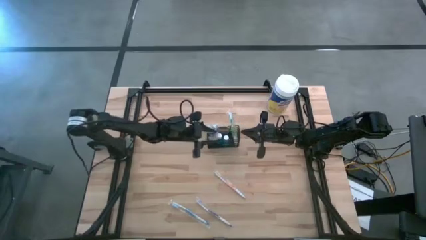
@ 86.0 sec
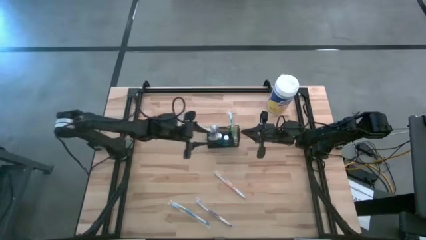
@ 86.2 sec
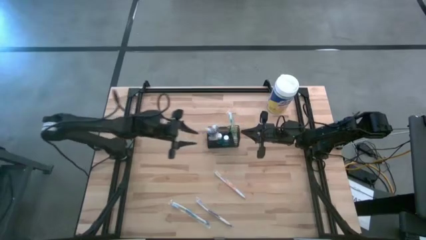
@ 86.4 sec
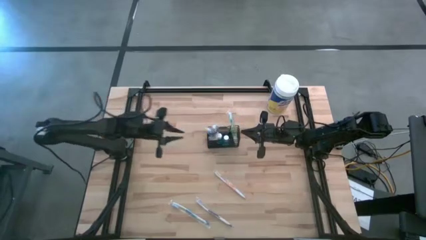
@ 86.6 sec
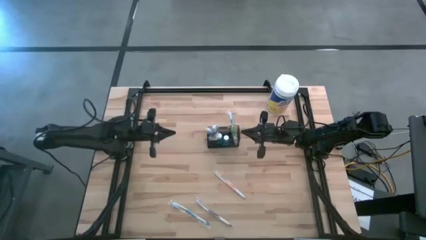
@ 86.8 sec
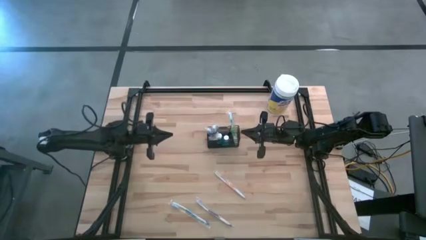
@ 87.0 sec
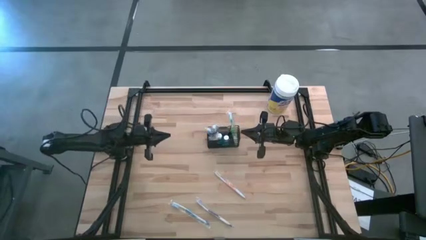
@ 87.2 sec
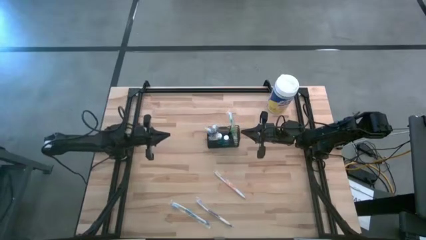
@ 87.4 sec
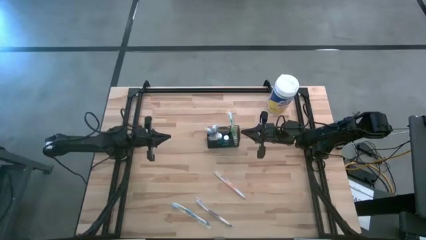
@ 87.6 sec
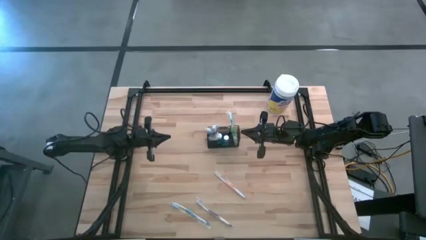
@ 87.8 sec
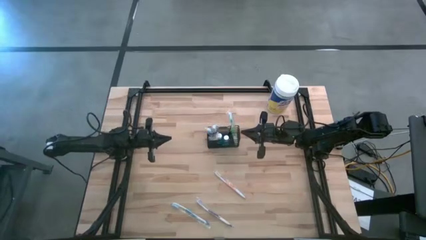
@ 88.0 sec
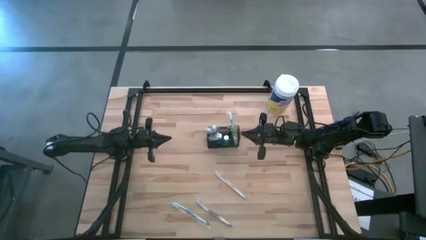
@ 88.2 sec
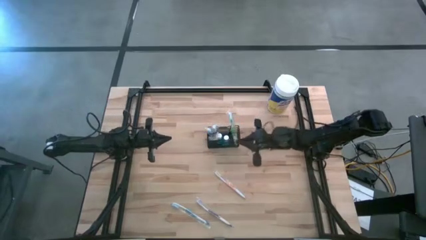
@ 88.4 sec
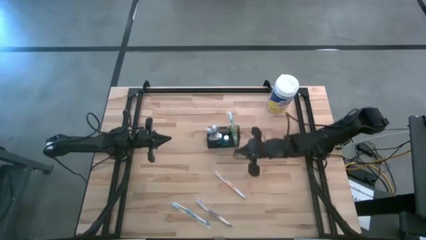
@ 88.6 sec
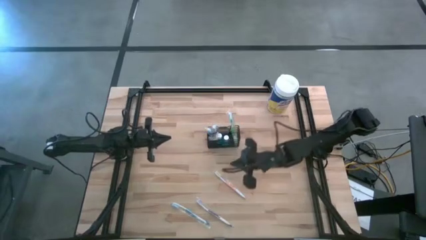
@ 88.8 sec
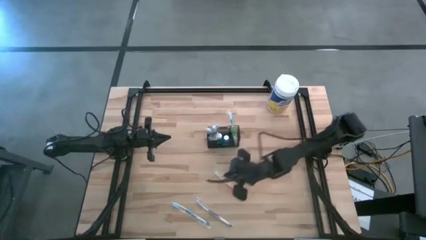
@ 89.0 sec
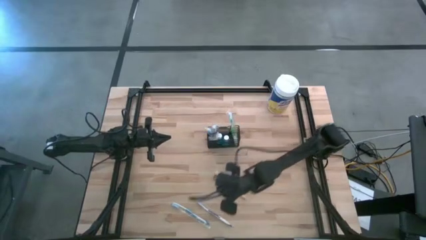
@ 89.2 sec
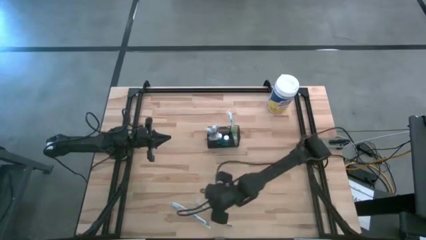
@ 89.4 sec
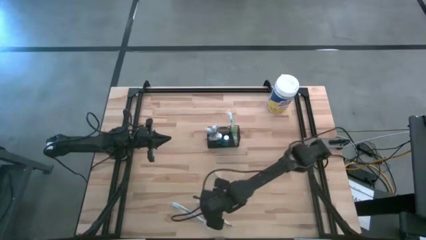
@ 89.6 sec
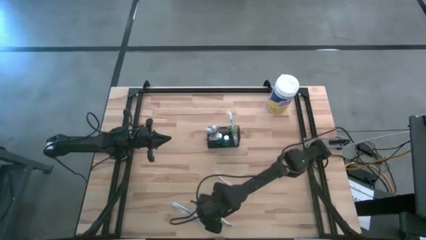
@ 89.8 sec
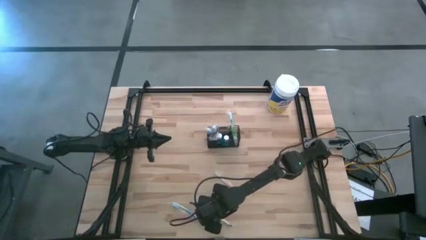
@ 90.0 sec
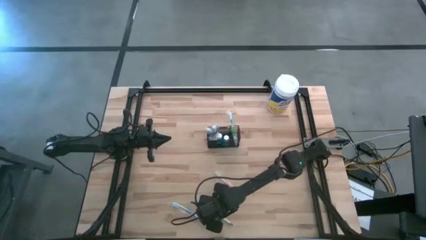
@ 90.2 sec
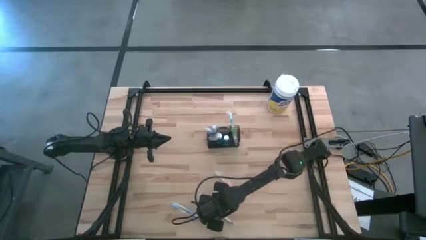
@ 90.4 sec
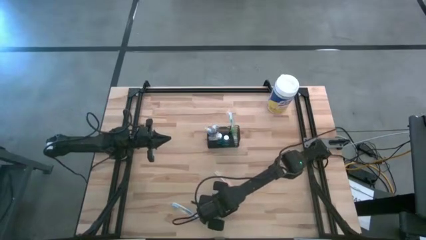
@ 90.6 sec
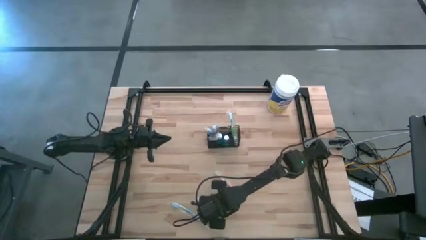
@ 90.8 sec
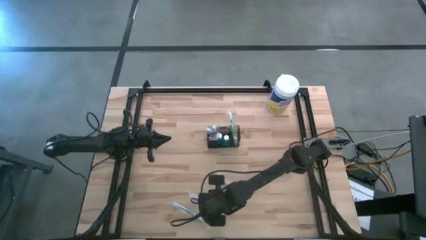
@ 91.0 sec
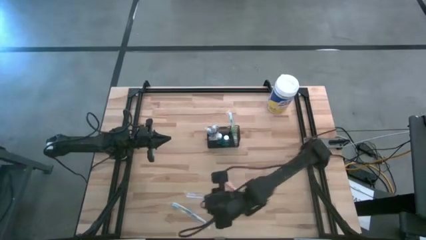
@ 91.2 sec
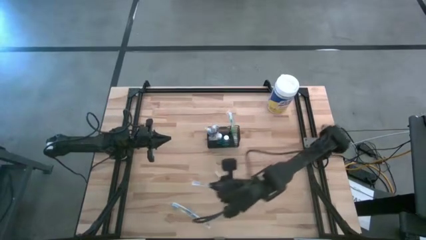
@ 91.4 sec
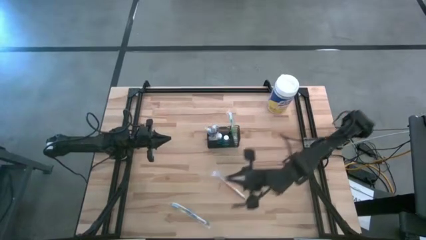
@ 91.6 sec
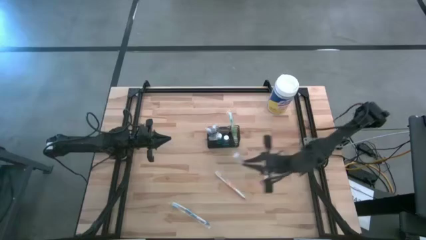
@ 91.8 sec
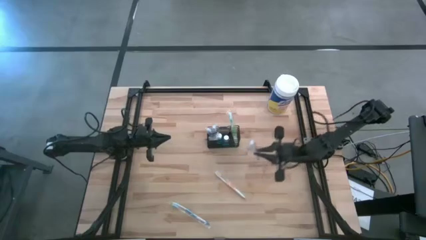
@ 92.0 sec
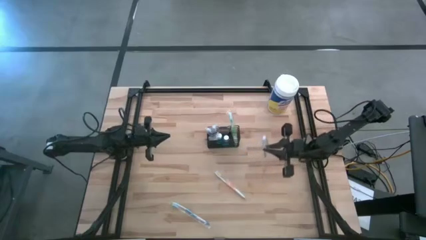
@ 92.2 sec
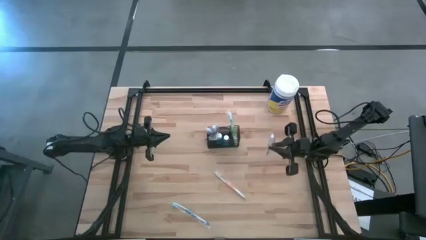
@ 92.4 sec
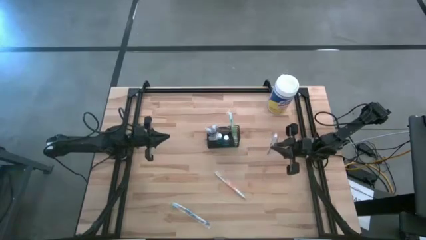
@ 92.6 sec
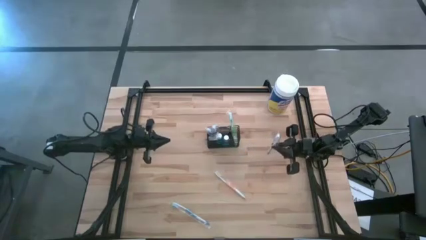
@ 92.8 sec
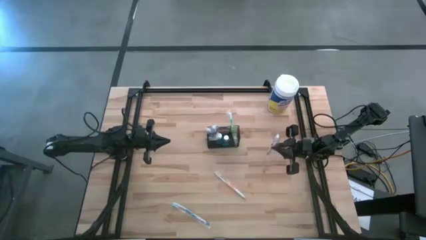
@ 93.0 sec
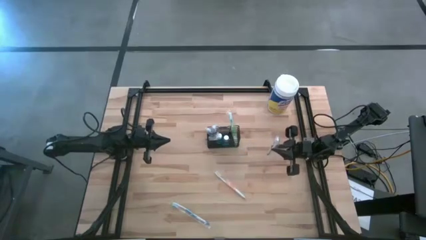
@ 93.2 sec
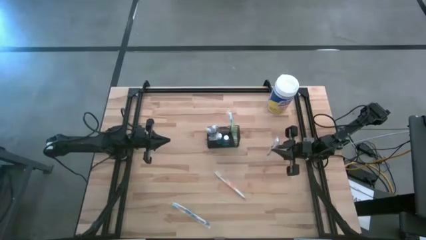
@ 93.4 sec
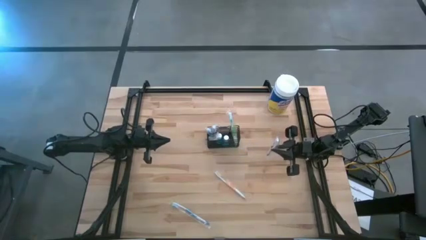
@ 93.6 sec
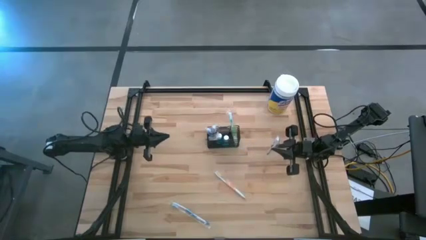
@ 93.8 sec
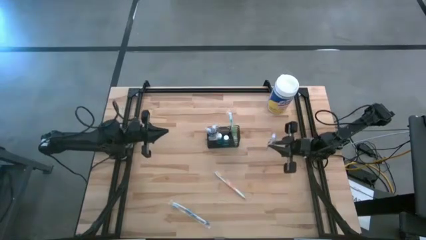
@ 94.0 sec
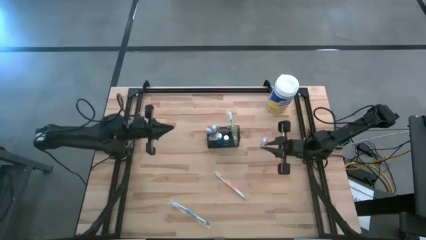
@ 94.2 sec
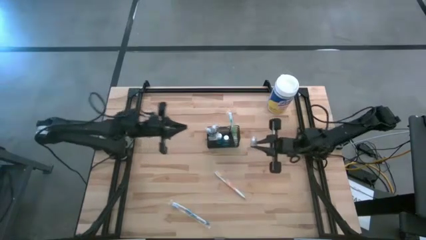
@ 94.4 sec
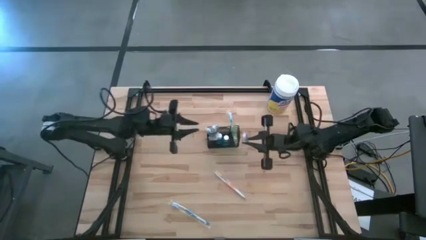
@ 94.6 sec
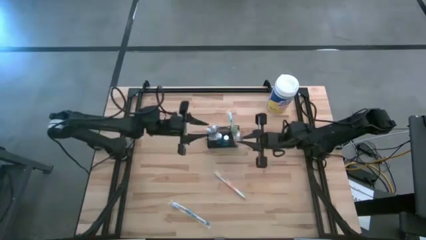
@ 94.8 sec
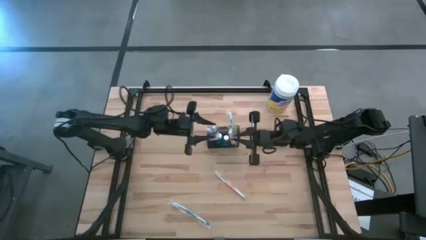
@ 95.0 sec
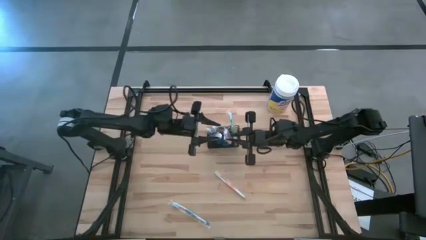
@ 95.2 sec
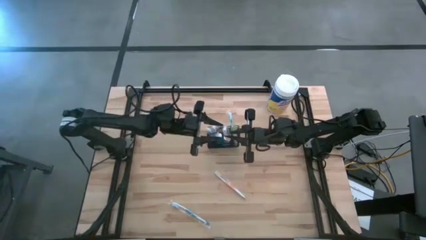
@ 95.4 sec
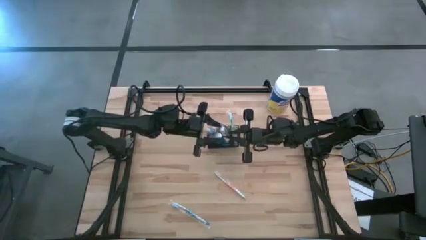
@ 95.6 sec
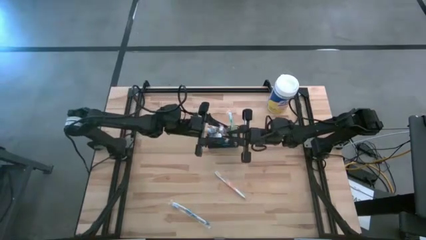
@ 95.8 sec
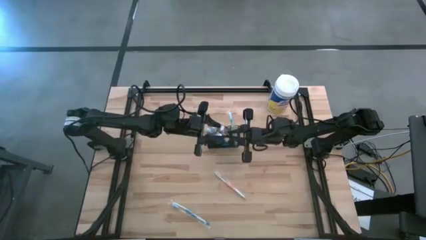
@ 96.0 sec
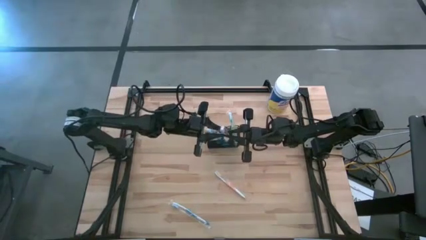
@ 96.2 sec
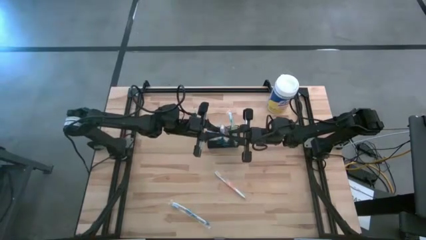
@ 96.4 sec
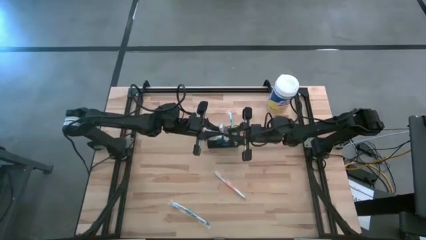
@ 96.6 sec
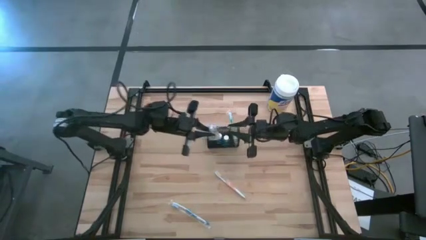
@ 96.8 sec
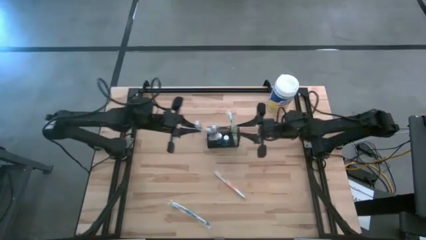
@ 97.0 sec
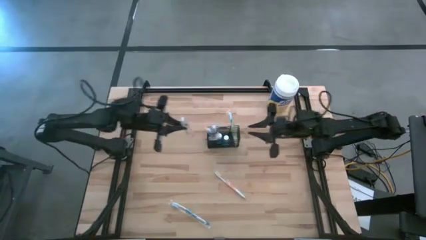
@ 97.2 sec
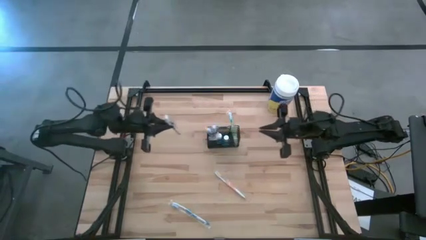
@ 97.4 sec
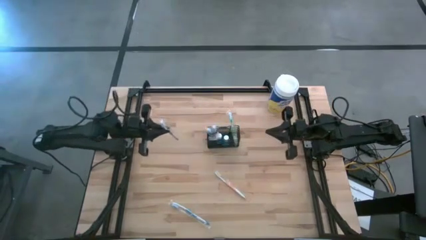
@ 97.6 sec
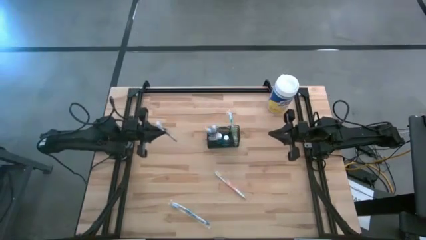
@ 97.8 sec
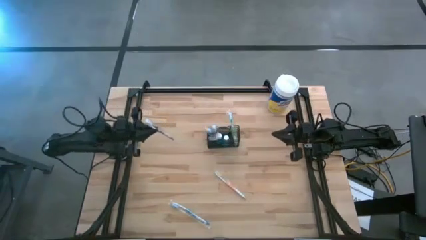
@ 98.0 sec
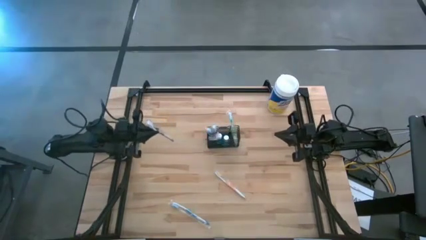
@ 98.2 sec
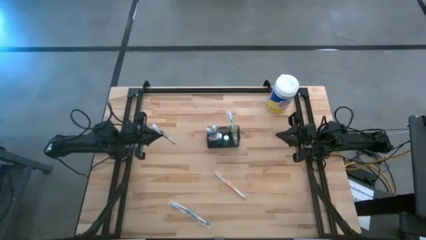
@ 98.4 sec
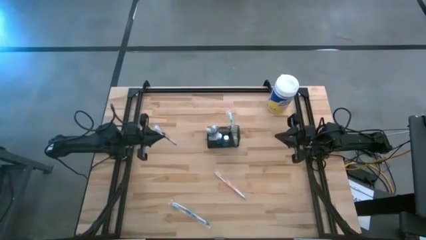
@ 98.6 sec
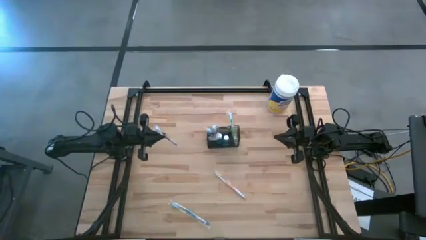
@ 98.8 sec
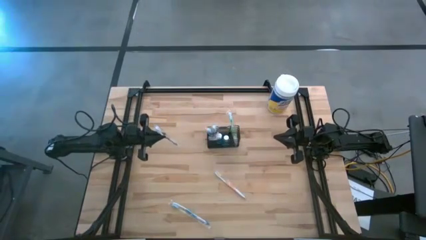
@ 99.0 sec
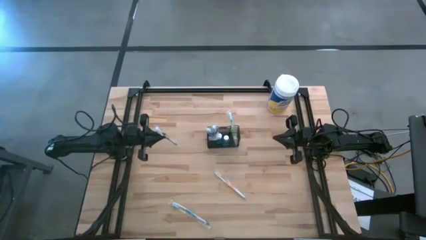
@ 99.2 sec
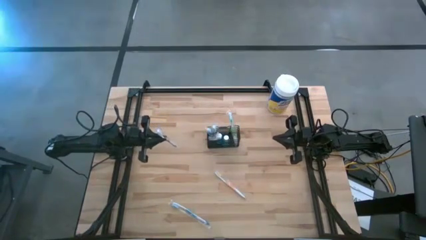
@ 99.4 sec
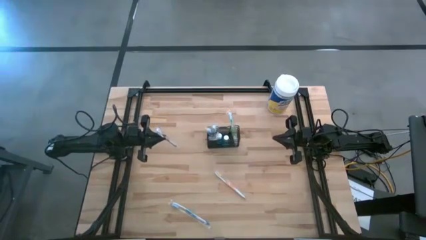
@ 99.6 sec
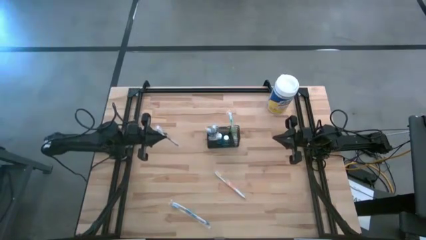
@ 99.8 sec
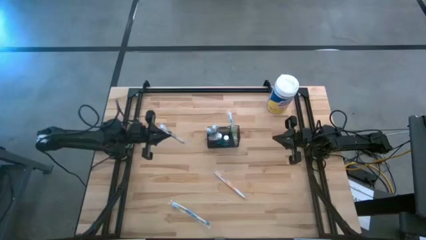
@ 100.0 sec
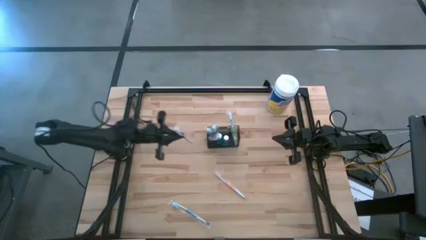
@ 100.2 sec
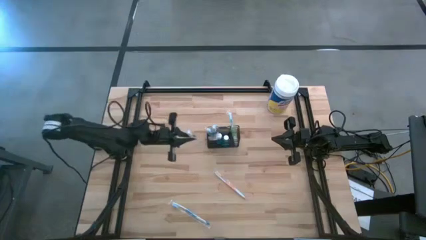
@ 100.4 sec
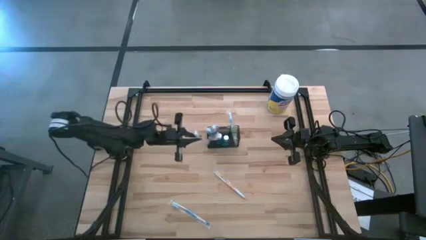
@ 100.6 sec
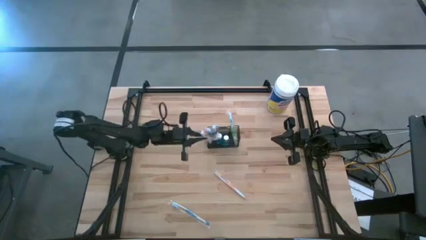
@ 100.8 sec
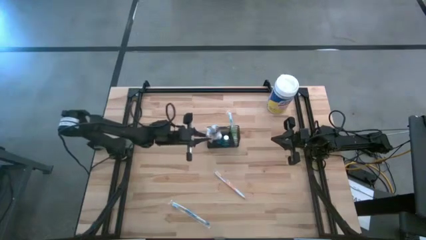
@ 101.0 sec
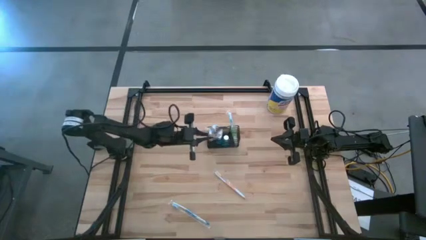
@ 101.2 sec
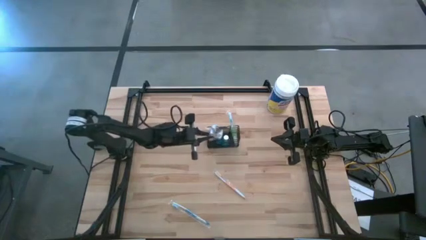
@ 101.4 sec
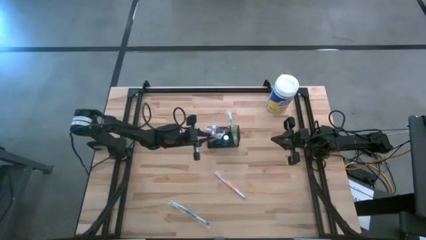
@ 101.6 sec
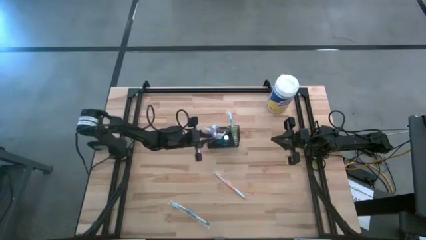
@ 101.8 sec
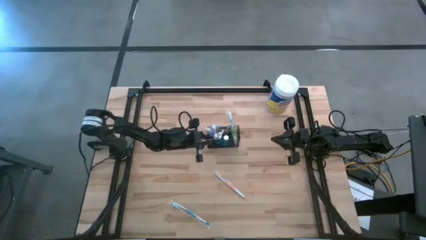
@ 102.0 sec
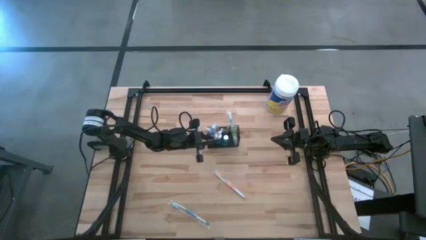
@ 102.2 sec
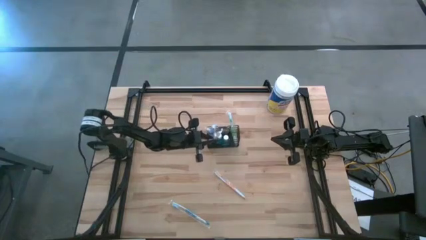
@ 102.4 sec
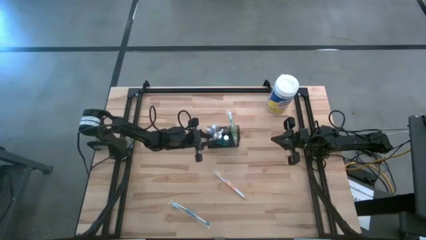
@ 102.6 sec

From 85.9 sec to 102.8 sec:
Task: Pick & Place toothbrushing station
Put the purple toothbrush into the wire organizer
